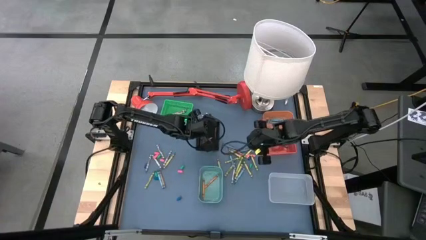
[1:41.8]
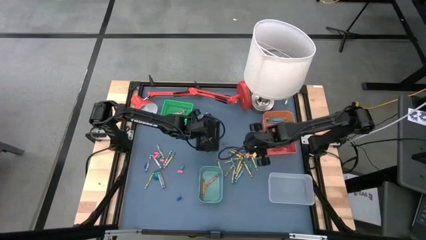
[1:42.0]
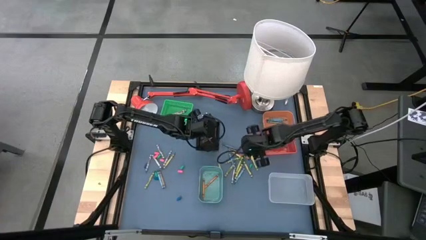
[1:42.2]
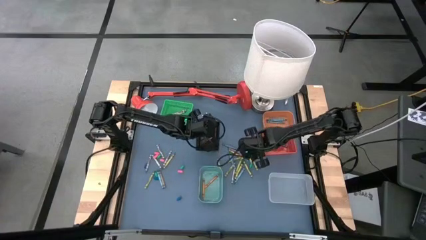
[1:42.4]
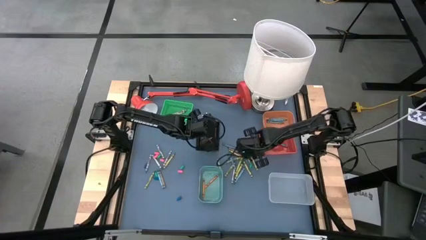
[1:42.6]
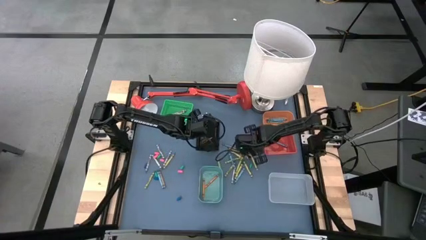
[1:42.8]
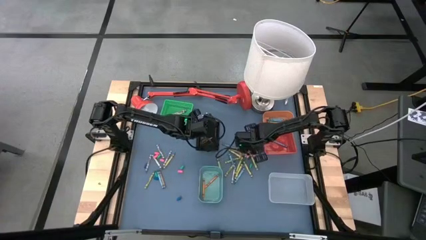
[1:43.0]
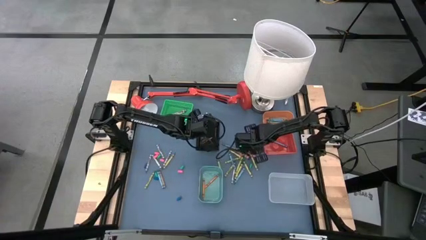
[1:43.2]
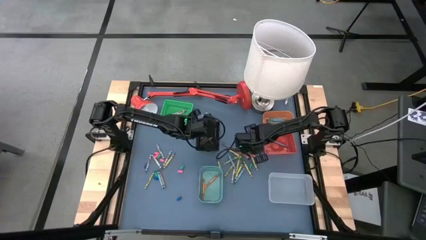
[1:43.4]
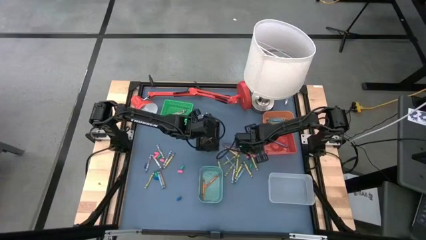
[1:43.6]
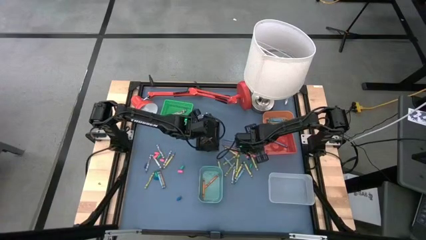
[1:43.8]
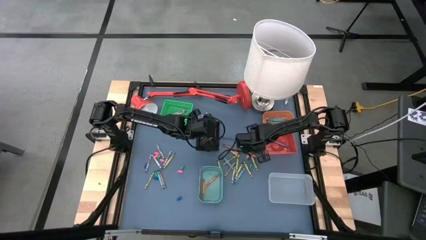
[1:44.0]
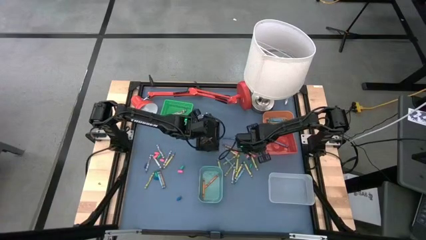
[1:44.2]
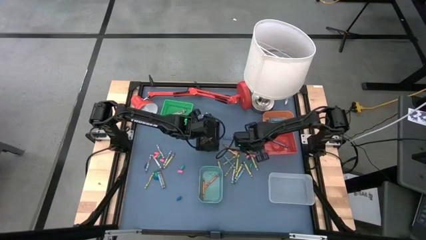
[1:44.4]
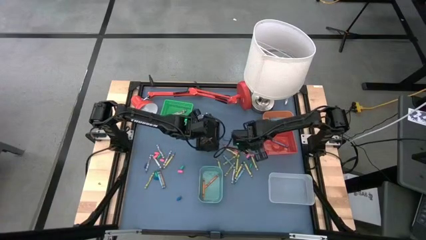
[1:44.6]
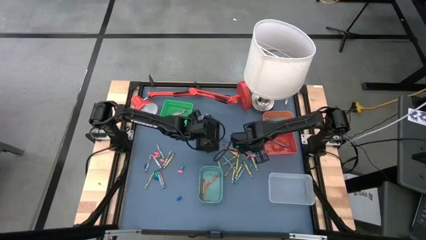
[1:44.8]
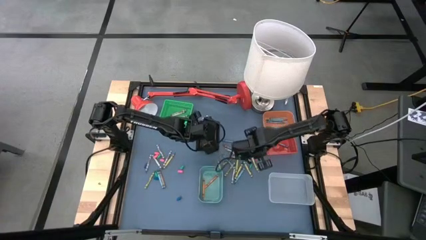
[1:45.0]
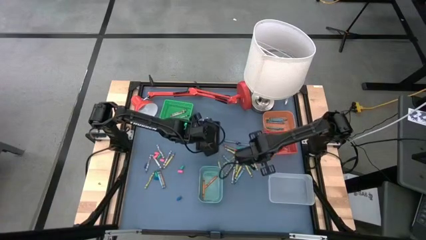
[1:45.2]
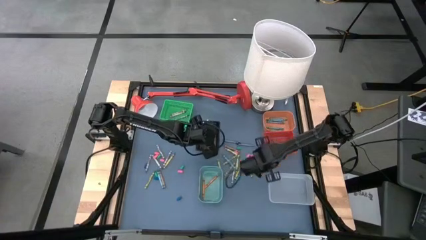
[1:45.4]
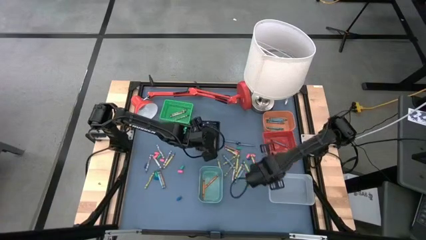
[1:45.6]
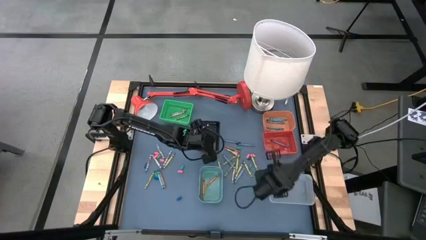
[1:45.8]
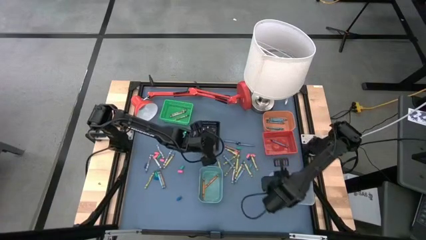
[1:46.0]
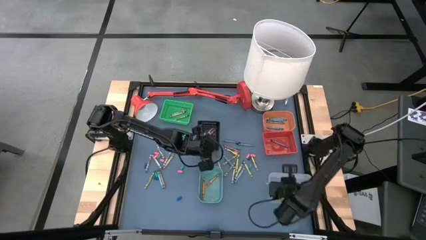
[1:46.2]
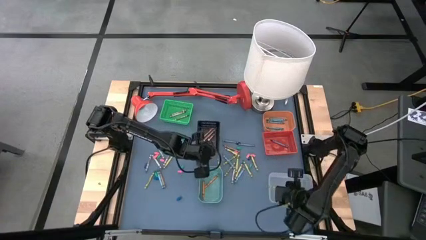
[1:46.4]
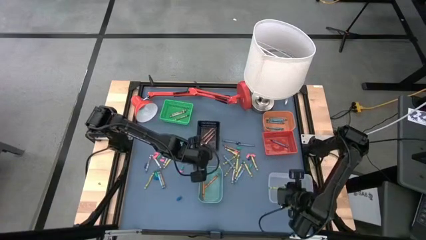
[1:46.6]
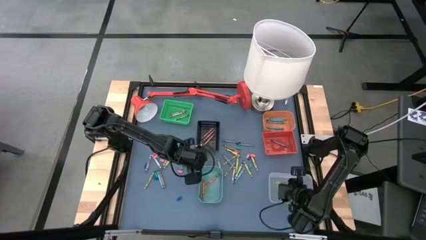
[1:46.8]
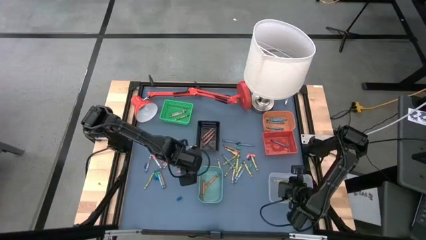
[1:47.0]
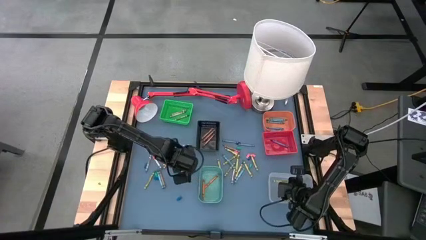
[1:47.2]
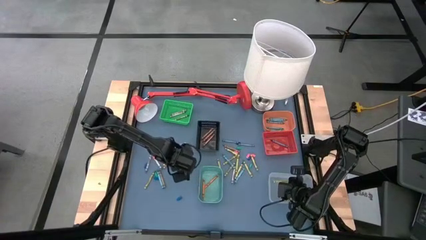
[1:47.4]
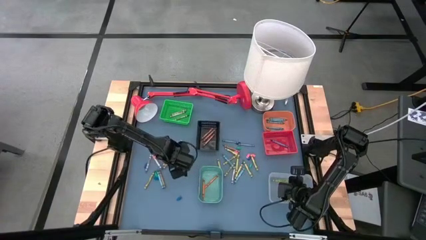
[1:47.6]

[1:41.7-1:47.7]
Task: Sort crayons
Put the green crayon into the transparent bin

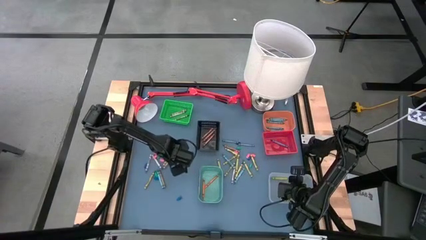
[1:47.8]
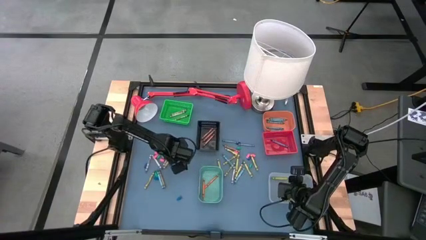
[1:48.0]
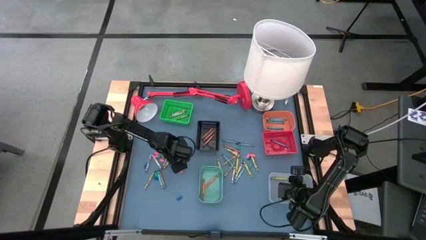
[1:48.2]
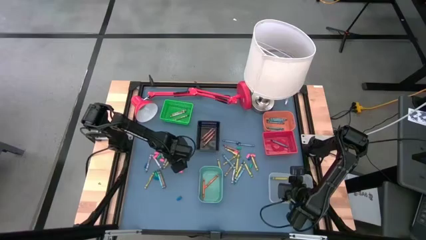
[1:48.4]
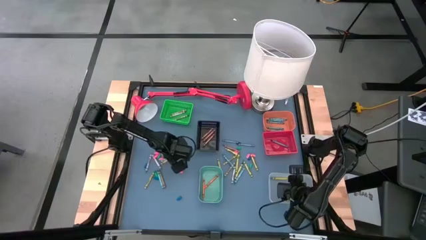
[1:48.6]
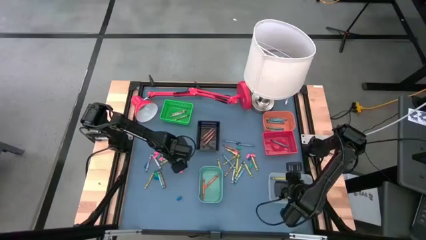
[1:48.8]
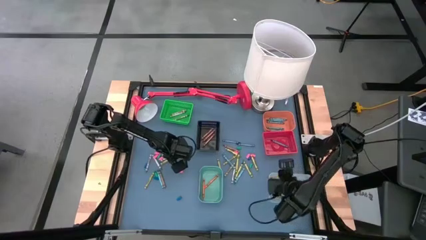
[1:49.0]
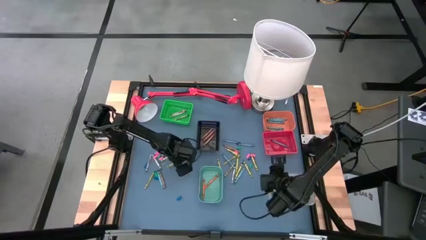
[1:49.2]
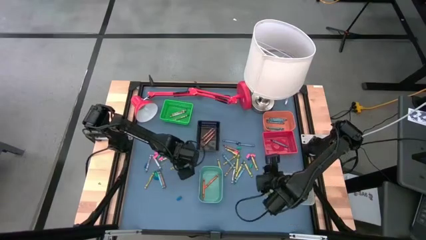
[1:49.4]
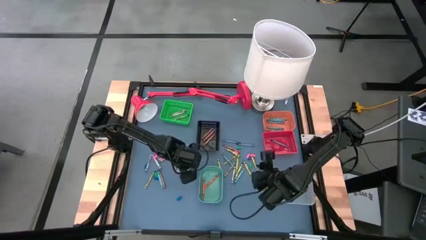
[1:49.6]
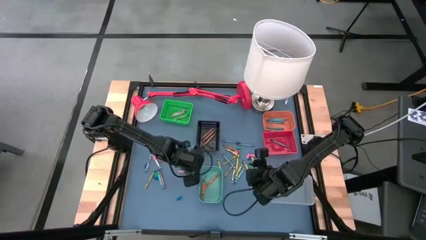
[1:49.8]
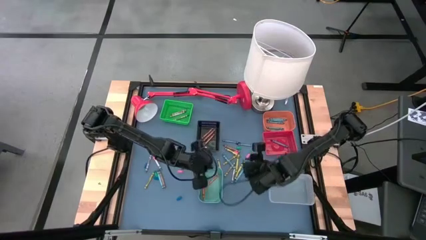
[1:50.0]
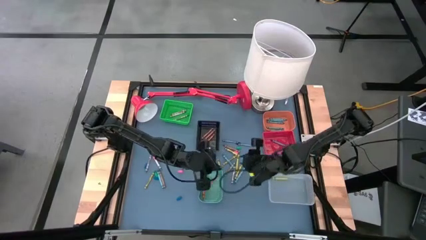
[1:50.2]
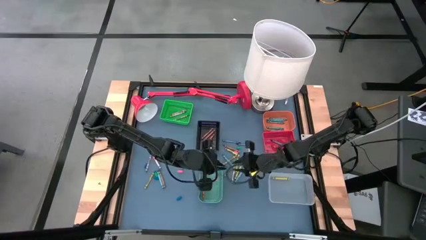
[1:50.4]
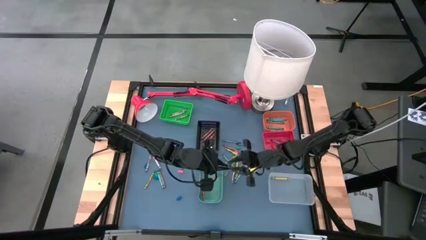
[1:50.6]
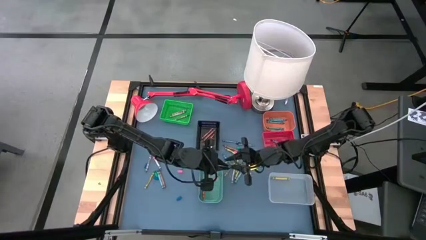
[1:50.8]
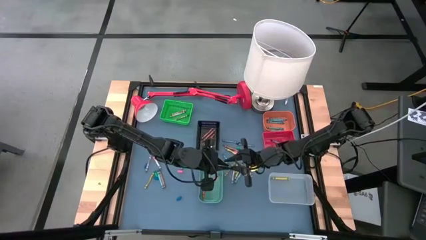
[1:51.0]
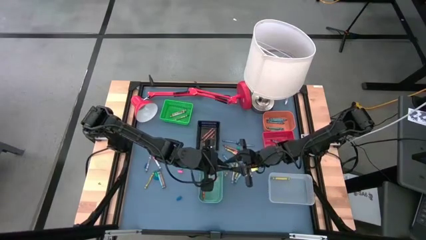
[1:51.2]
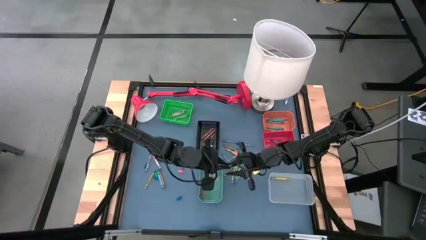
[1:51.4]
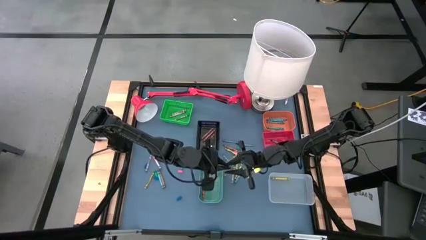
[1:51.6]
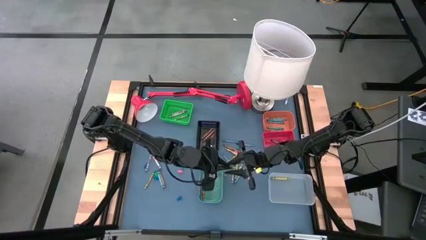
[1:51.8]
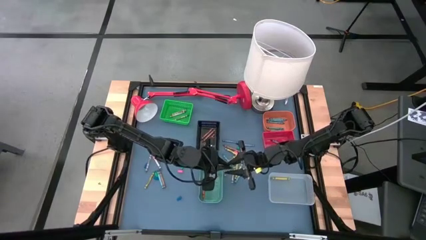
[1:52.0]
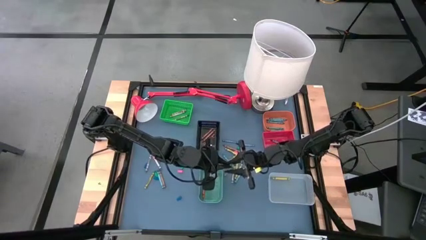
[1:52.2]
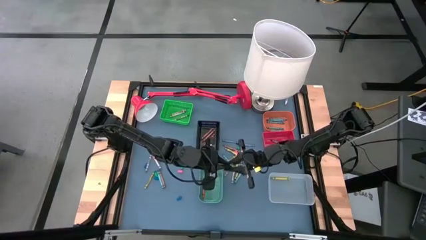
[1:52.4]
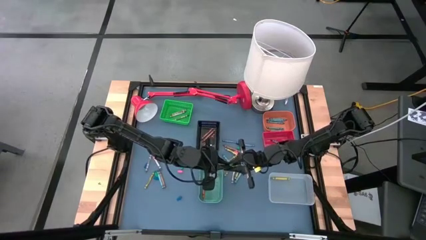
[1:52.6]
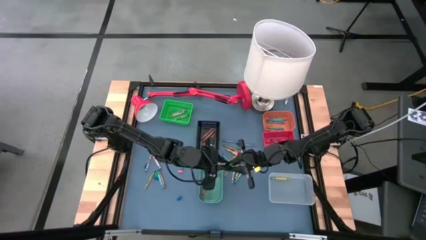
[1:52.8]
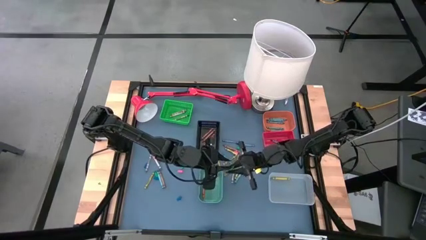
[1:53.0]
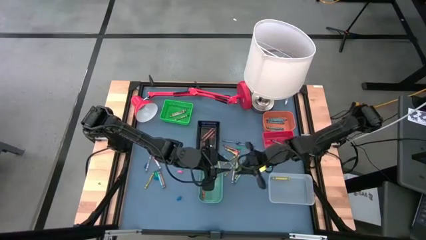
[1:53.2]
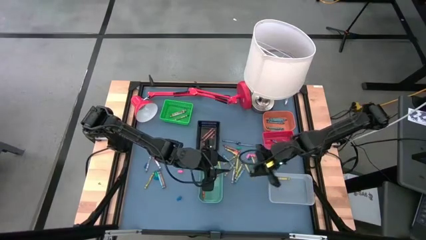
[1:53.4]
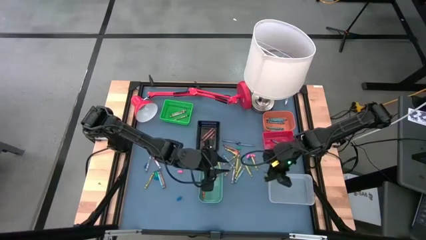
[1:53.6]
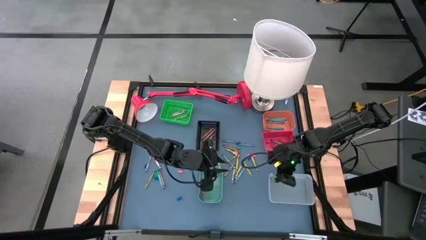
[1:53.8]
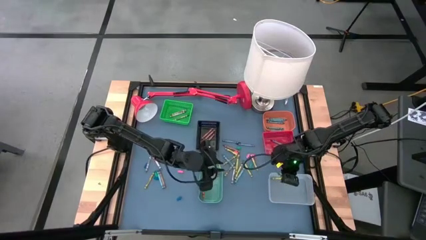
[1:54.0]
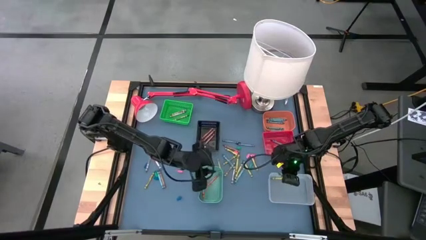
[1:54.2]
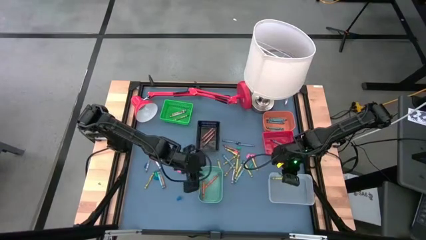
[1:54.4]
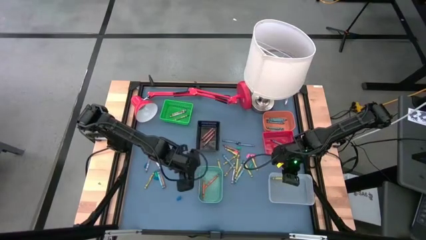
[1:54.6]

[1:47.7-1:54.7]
Put the green crayon into the transparent bin

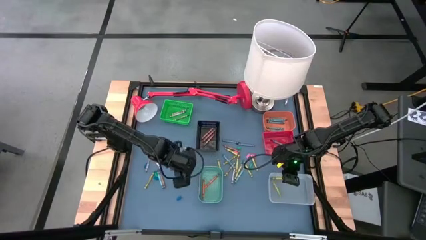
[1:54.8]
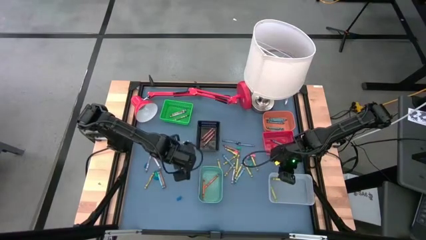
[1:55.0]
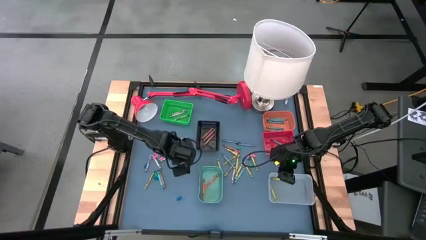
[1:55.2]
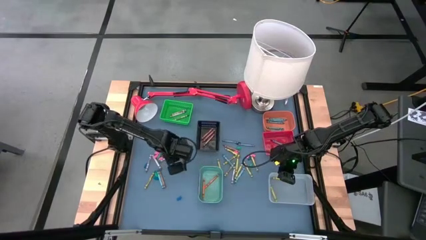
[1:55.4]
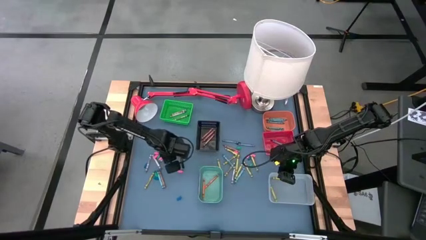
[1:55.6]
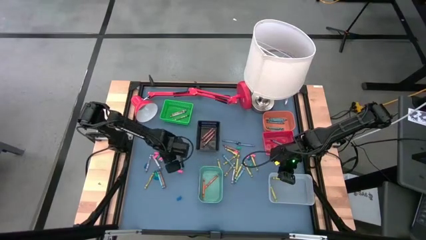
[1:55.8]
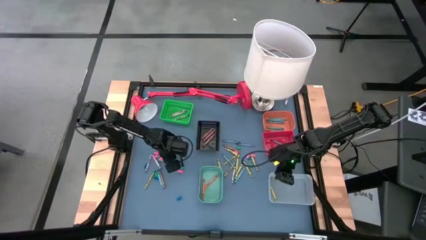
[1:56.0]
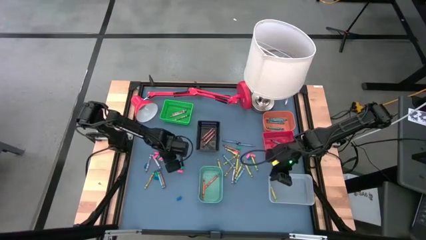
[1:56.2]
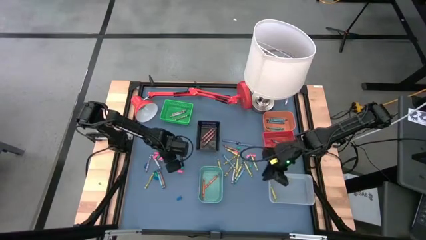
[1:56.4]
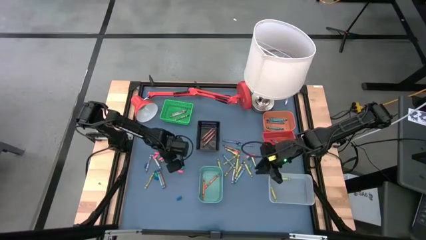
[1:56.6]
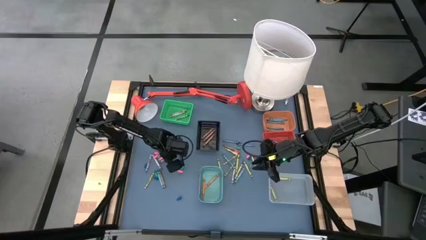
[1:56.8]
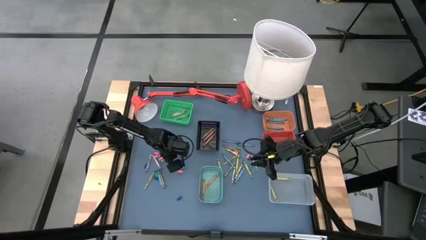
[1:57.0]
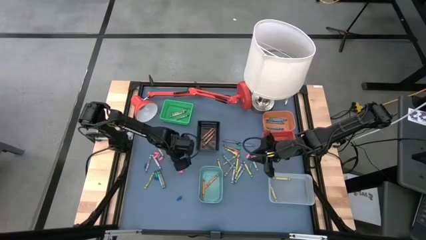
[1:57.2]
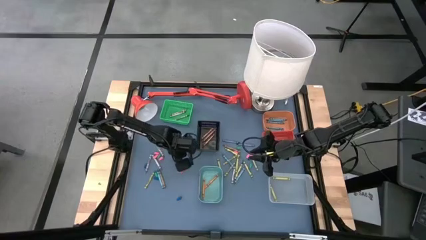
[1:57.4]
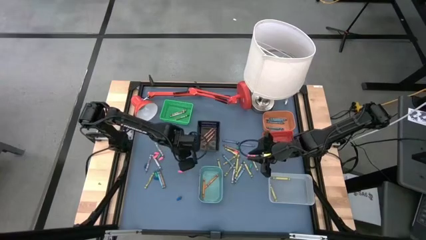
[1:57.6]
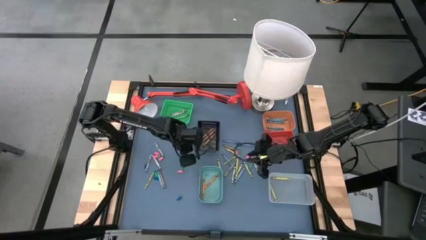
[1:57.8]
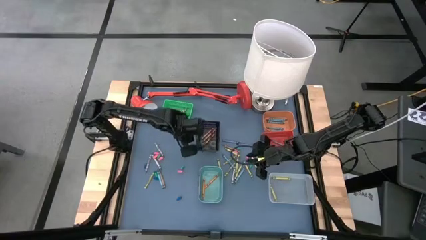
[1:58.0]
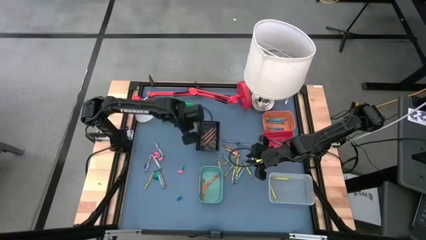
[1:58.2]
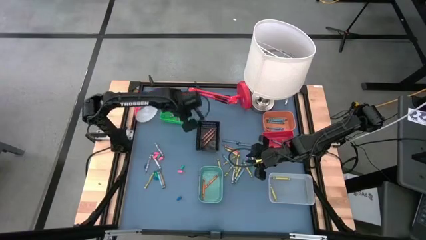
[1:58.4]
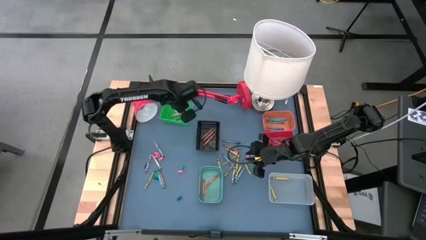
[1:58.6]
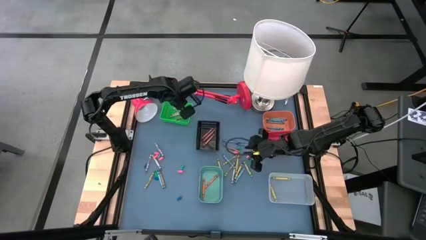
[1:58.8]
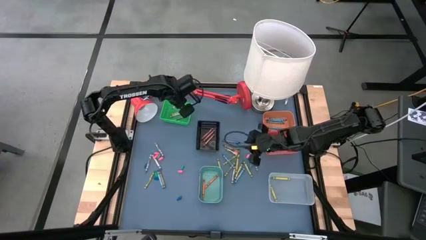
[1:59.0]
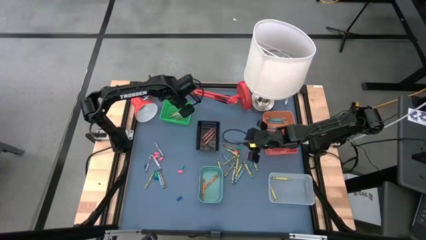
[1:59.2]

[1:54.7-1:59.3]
Put the gray crayon into the green bin
